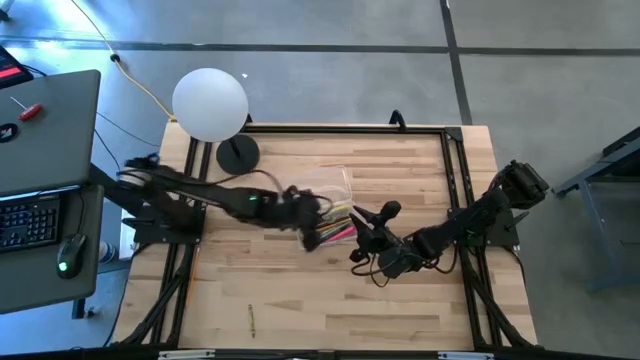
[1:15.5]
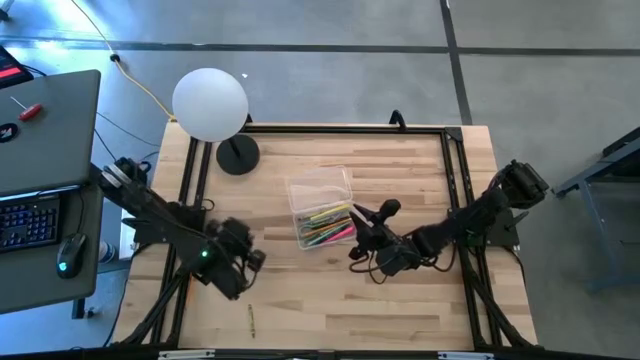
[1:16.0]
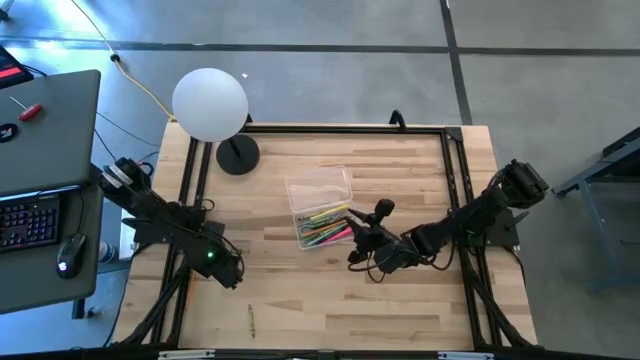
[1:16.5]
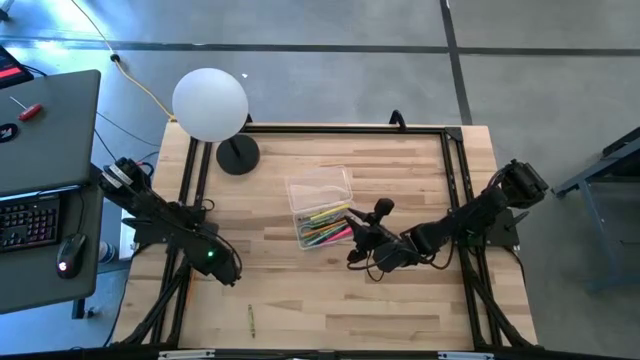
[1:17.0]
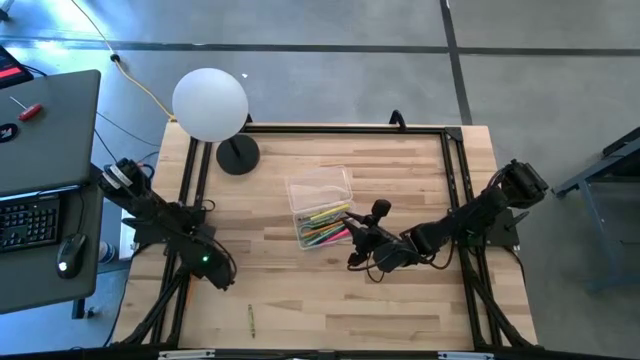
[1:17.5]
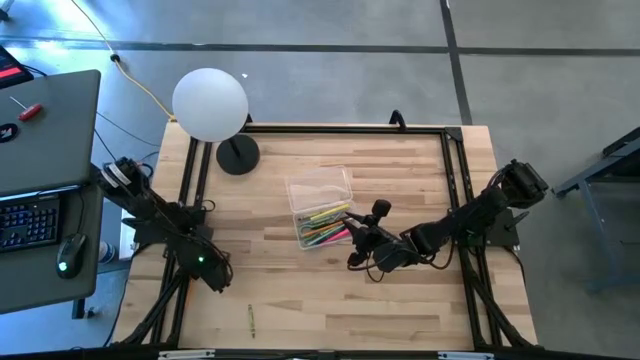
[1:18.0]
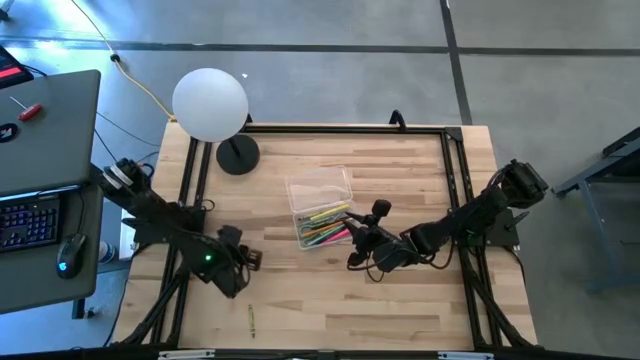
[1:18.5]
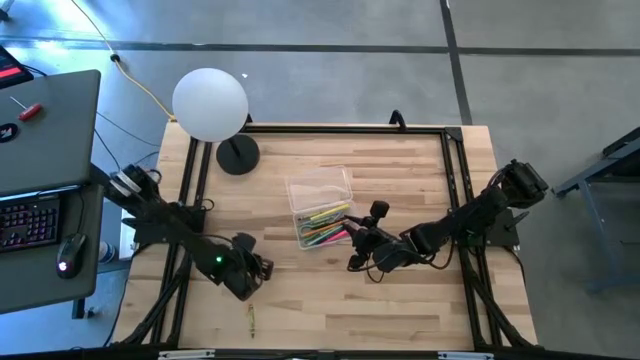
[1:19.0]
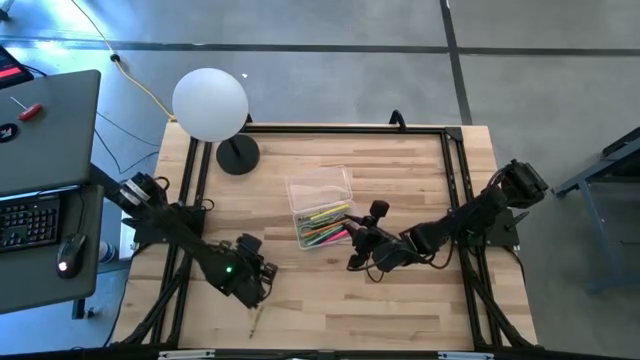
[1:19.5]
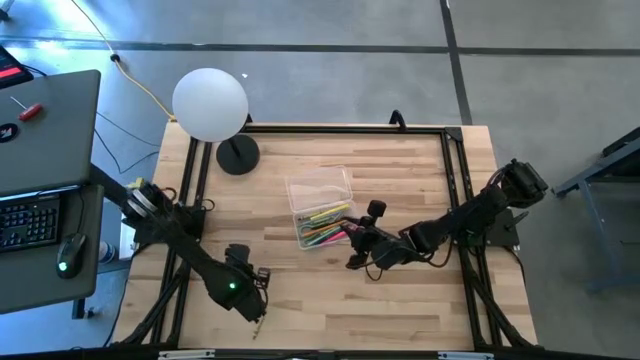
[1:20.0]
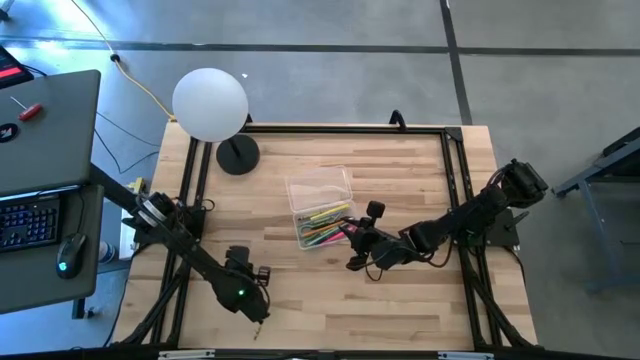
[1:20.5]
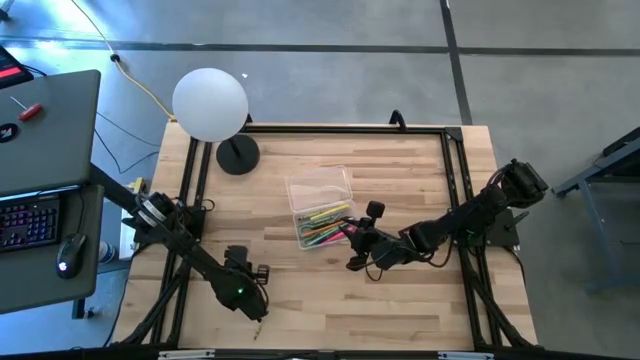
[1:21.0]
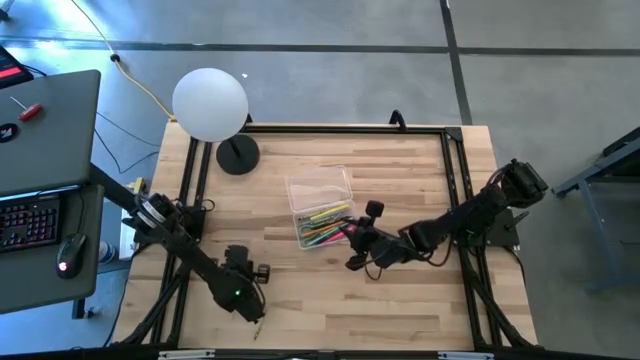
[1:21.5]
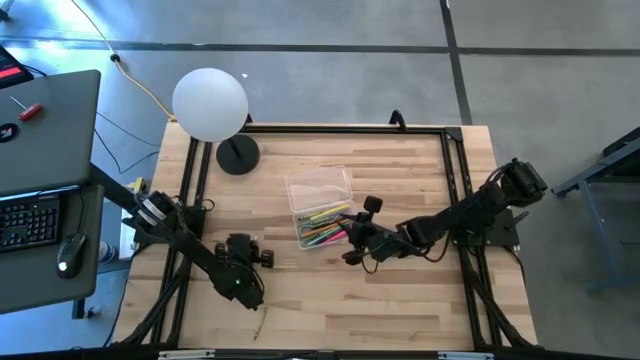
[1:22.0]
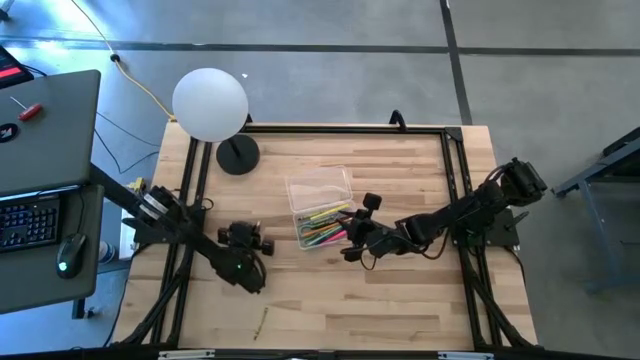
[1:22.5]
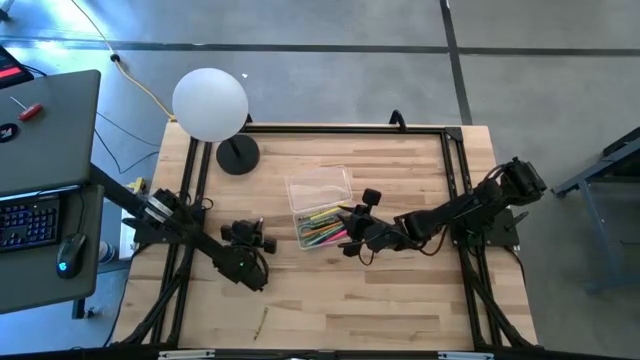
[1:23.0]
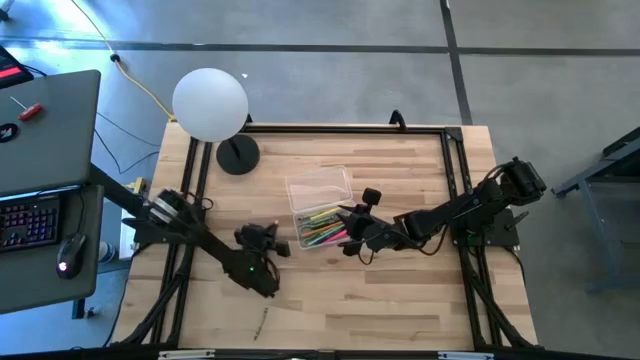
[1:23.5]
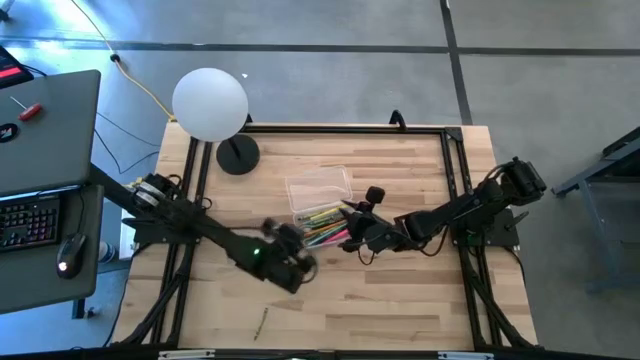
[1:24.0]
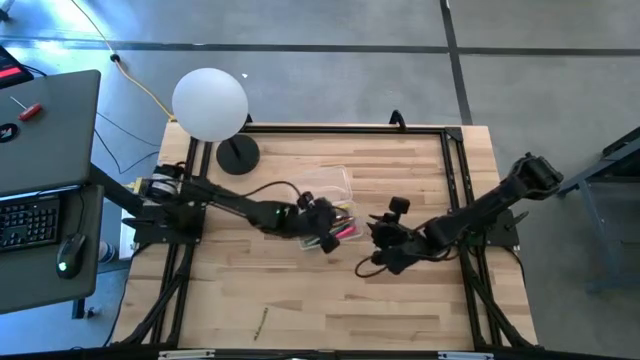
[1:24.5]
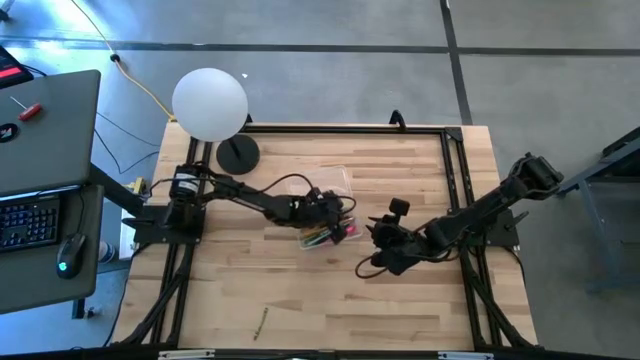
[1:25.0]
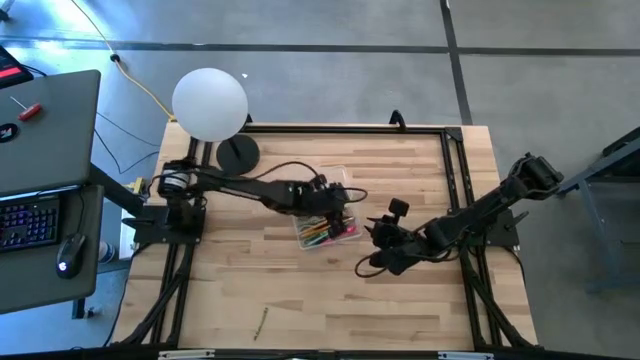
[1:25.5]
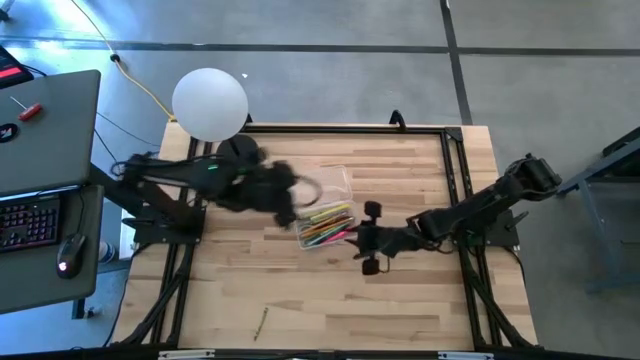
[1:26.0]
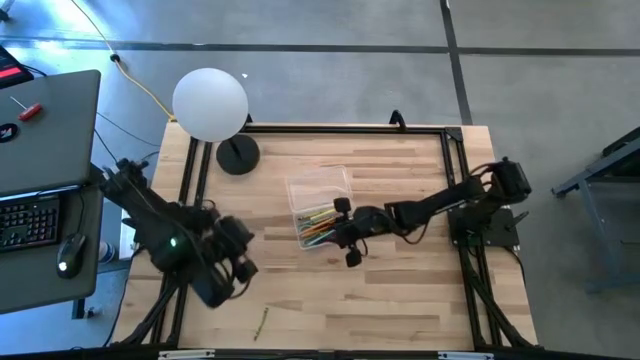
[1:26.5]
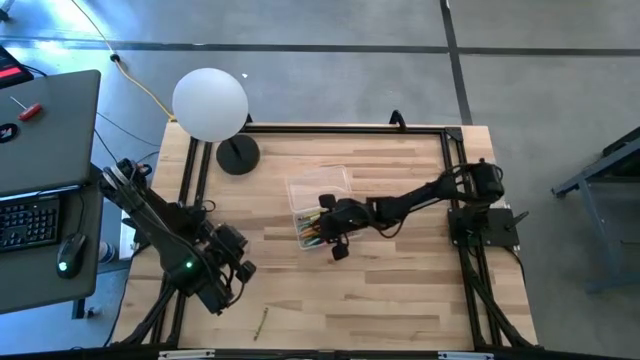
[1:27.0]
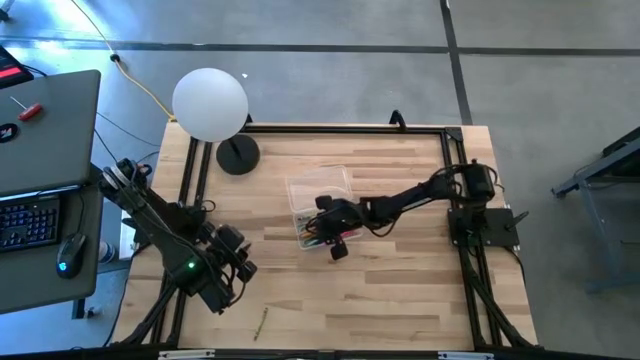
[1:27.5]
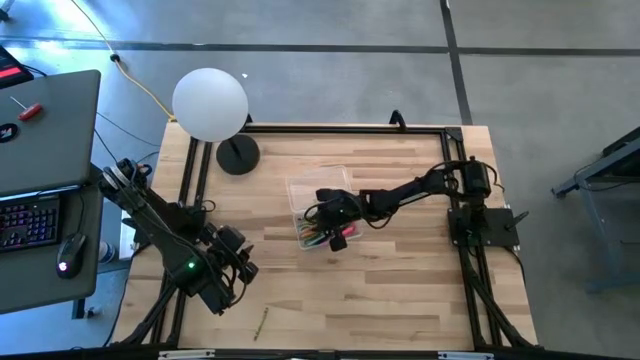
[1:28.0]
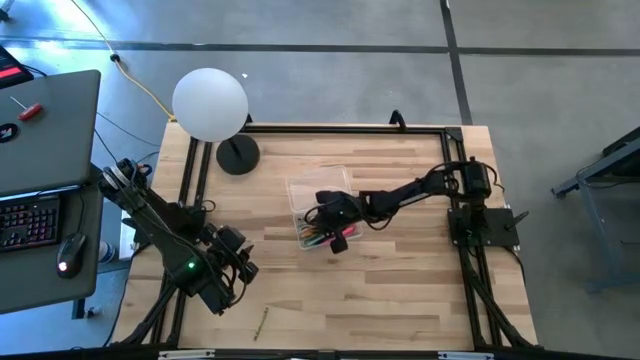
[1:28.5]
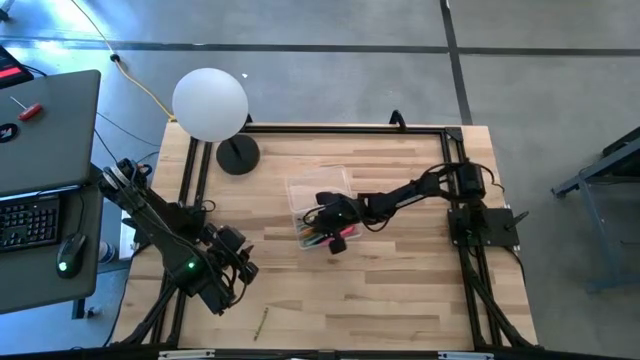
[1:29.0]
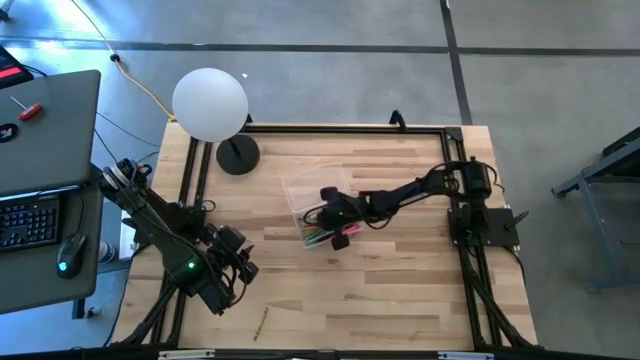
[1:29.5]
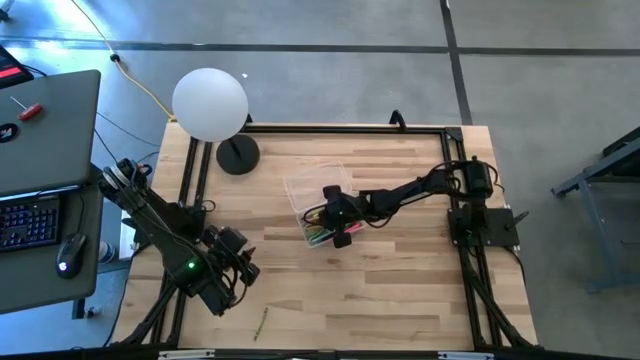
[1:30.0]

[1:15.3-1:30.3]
Task: Pick & place school supplies into a supply box
Put the yellow pencil into the transparent supply box

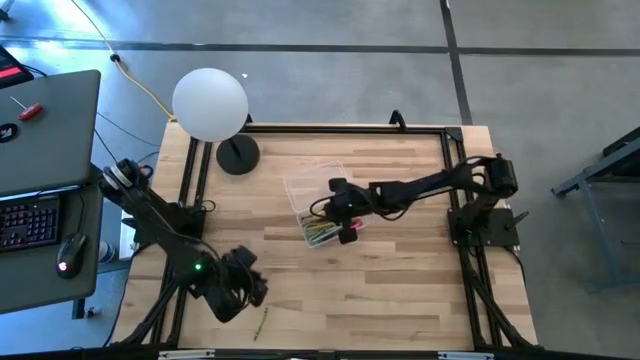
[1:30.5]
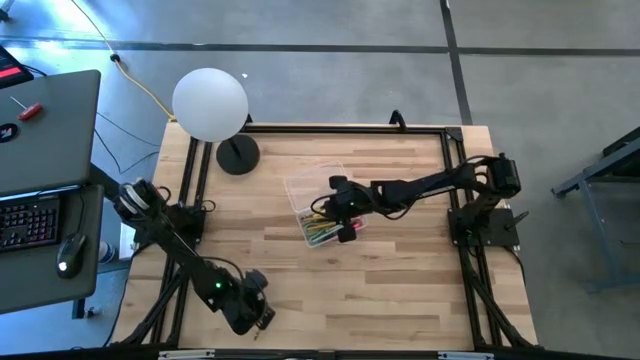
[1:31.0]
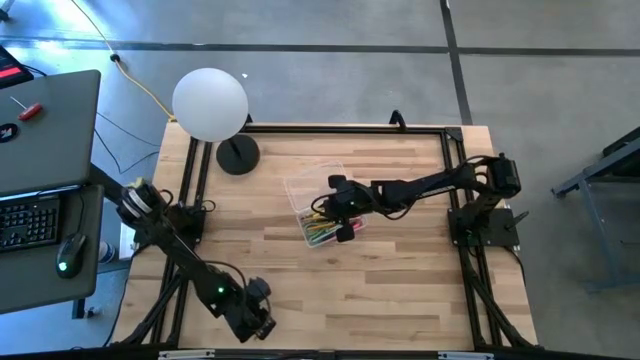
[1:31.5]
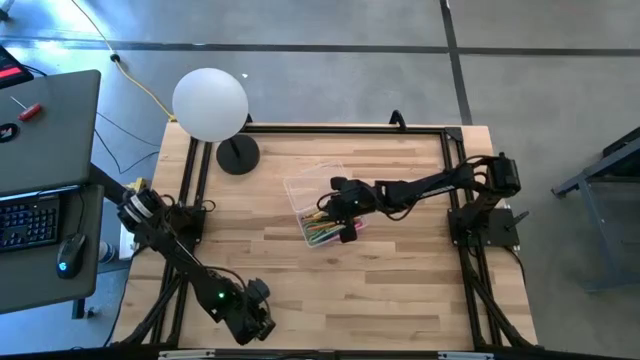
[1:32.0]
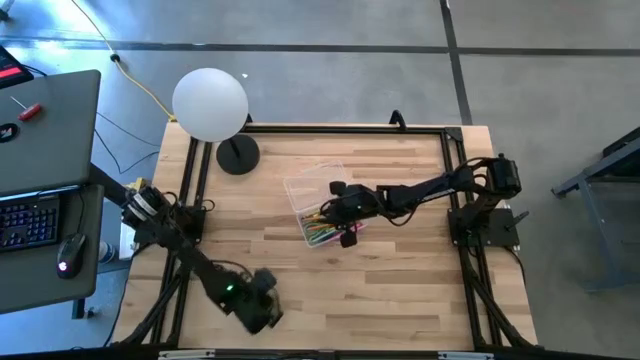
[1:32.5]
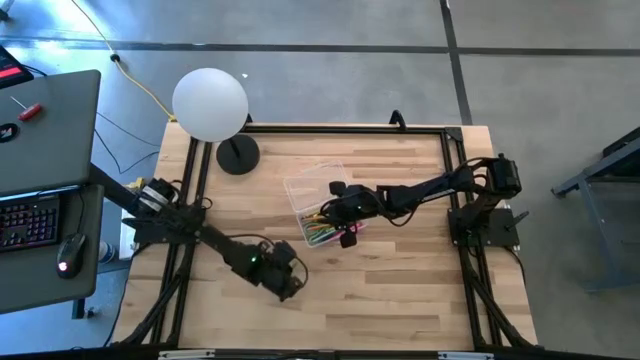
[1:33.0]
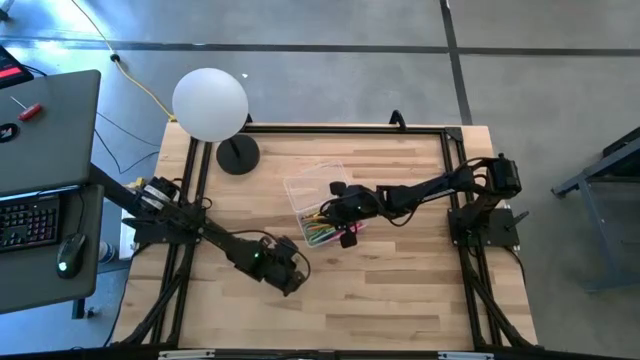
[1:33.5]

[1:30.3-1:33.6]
Put the green crayon into the transparent supply box

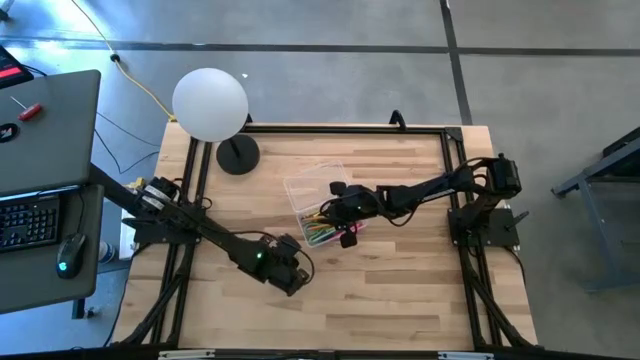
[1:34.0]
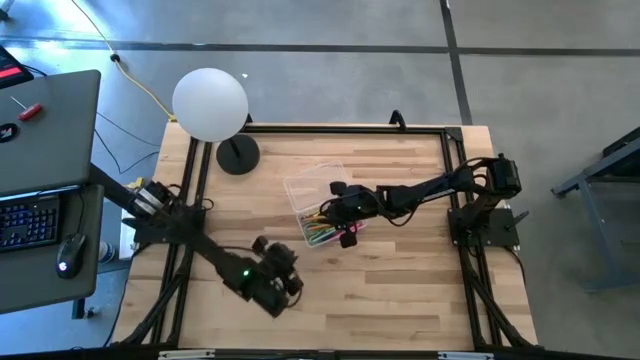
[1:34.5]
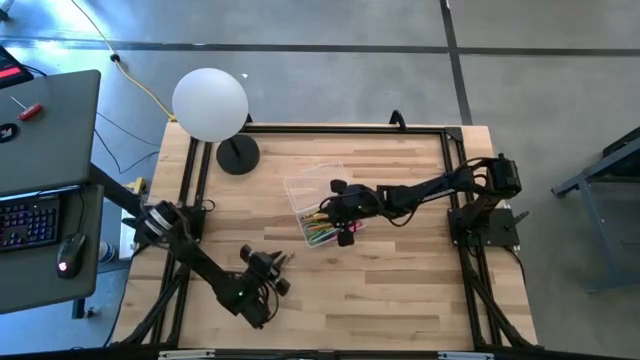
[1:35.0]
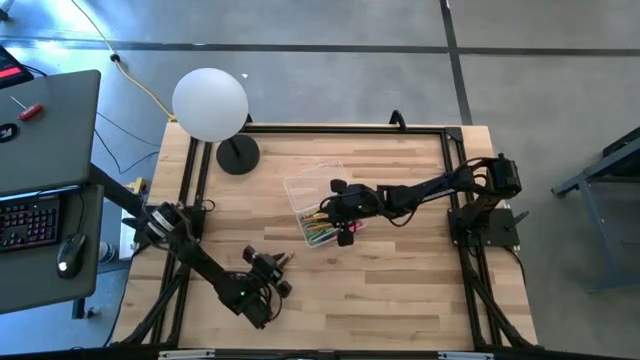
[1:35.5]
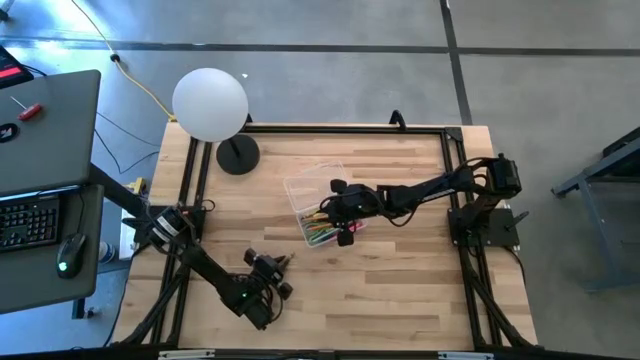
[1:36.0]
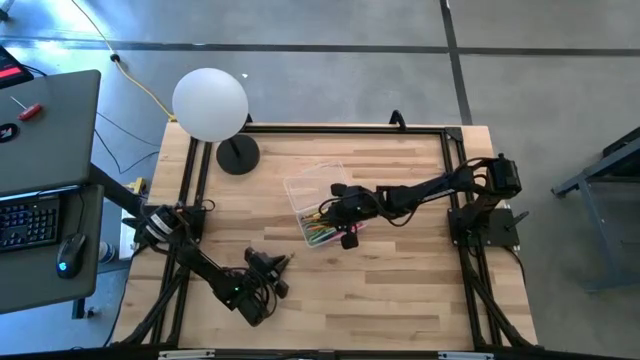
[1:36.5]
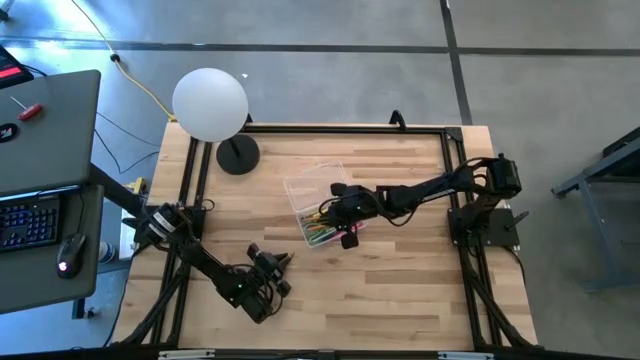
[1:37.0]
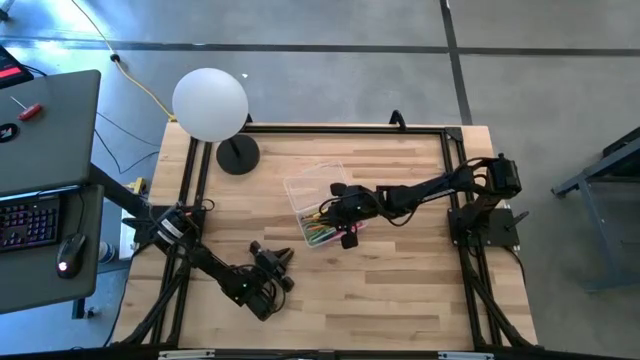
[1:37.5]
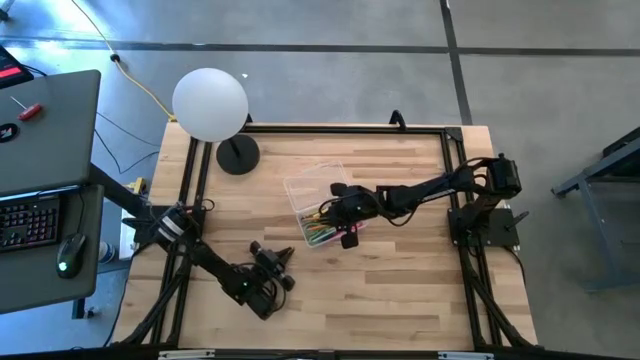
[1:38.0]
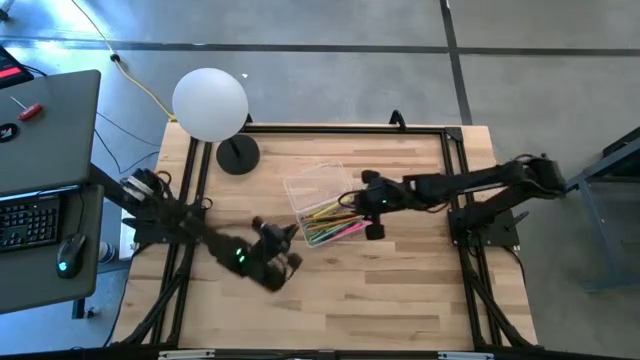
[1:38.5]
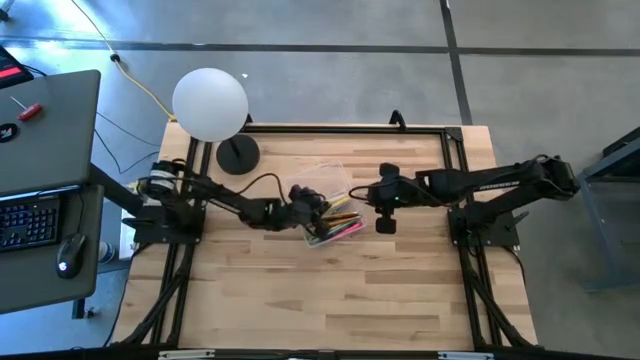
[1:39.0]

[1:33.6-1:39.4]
Put the green crayon into the transparent supply box
